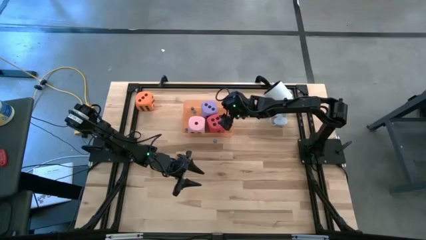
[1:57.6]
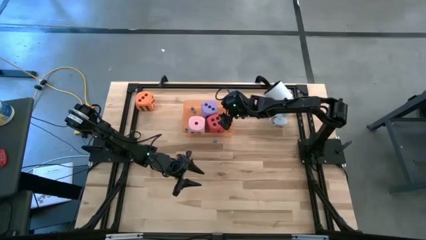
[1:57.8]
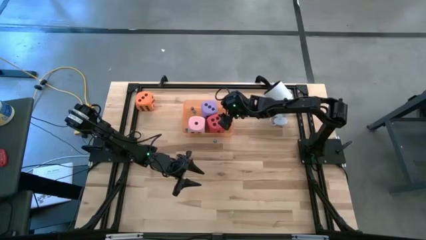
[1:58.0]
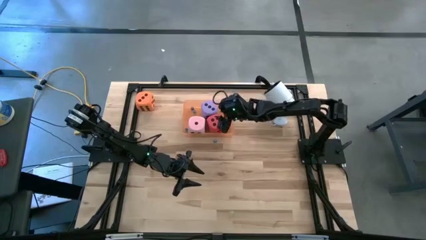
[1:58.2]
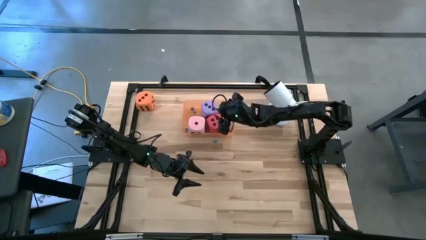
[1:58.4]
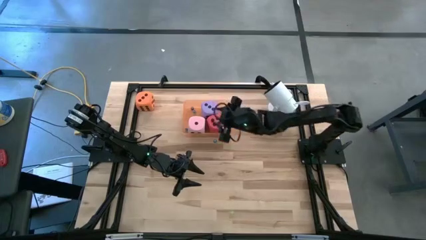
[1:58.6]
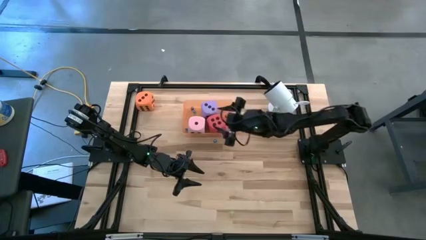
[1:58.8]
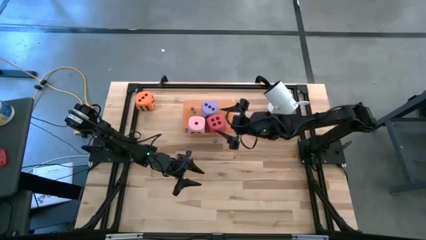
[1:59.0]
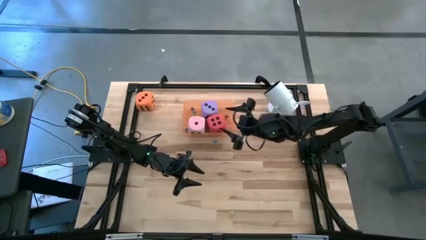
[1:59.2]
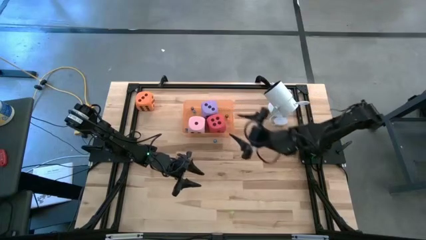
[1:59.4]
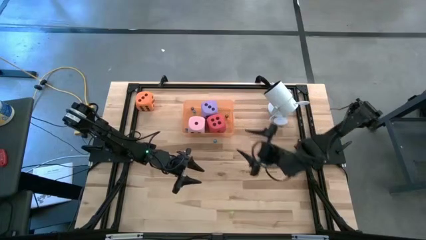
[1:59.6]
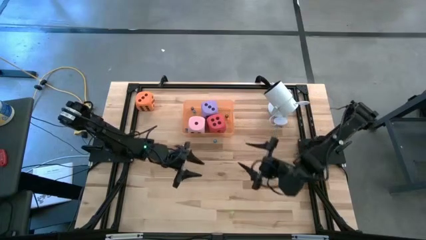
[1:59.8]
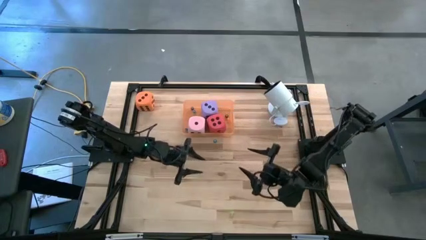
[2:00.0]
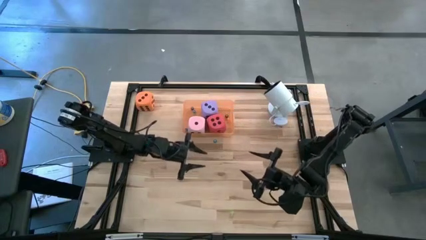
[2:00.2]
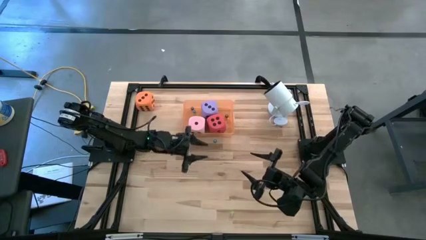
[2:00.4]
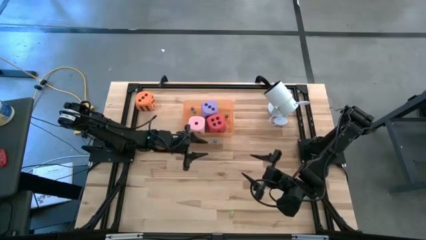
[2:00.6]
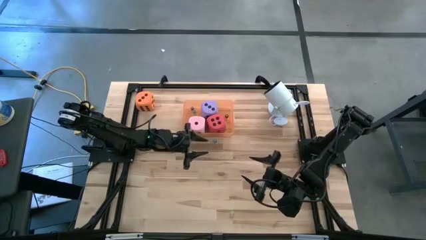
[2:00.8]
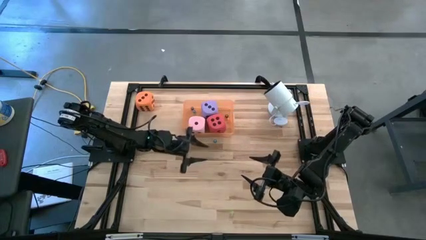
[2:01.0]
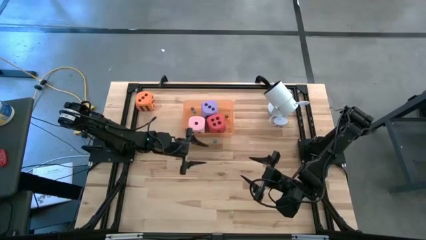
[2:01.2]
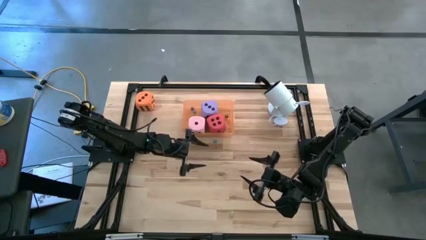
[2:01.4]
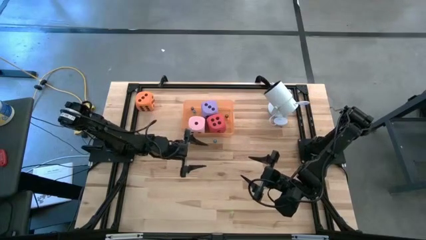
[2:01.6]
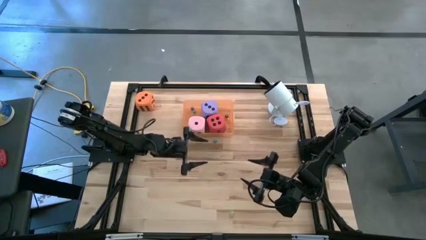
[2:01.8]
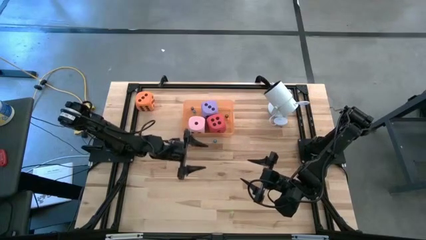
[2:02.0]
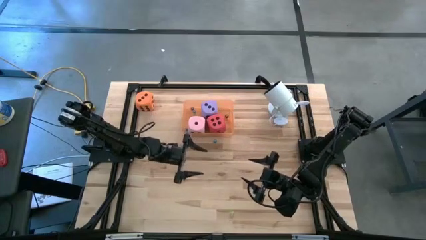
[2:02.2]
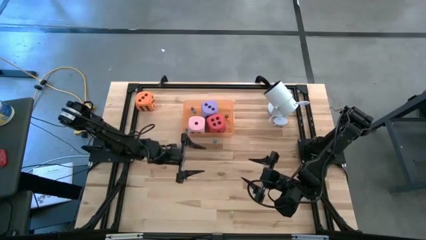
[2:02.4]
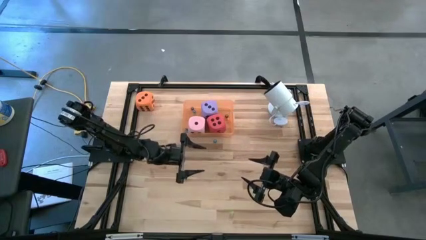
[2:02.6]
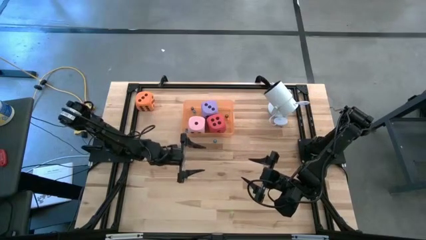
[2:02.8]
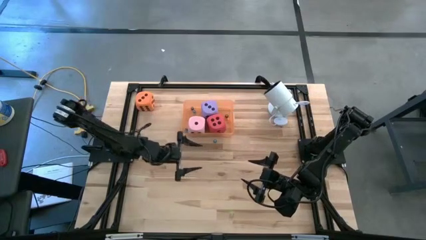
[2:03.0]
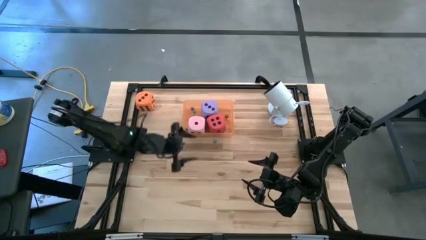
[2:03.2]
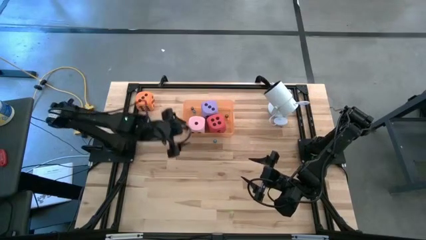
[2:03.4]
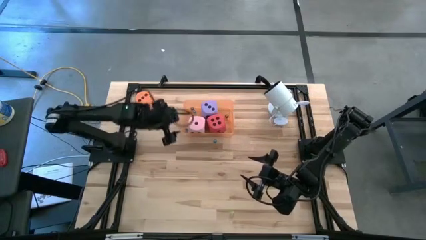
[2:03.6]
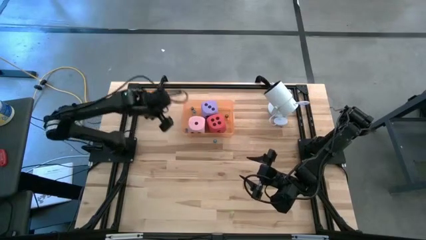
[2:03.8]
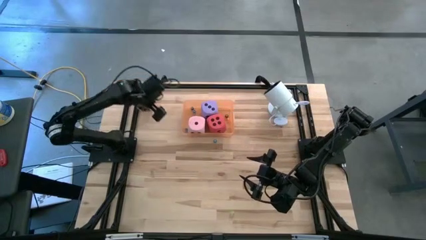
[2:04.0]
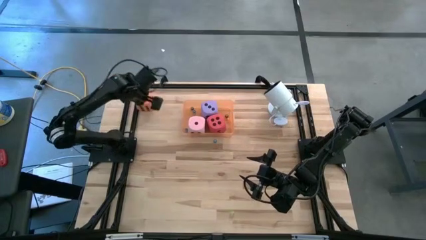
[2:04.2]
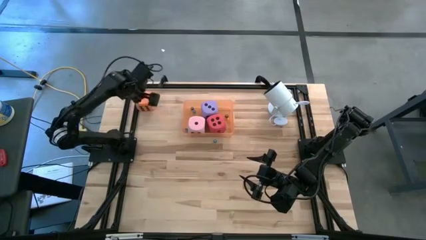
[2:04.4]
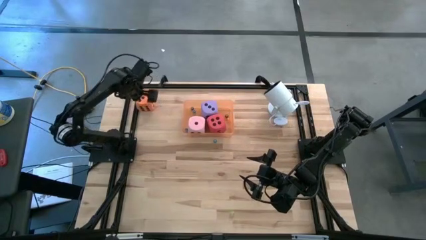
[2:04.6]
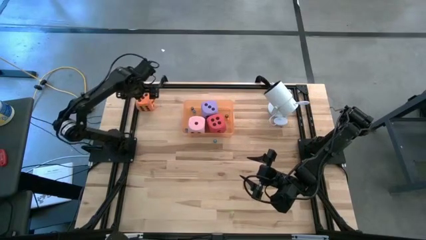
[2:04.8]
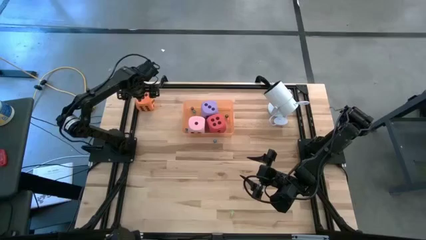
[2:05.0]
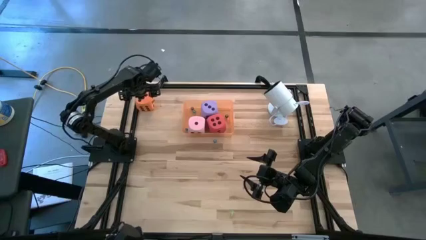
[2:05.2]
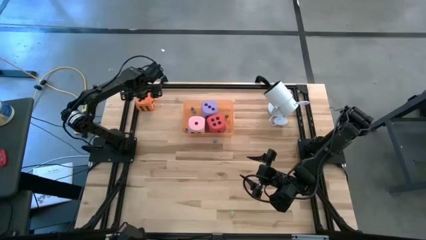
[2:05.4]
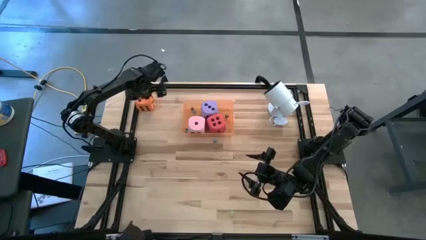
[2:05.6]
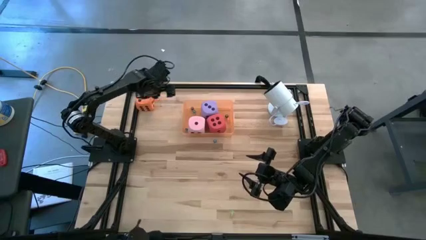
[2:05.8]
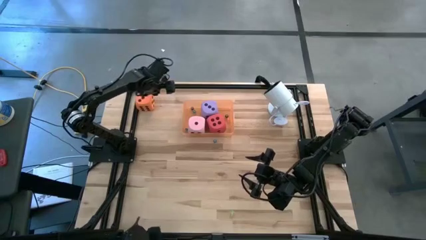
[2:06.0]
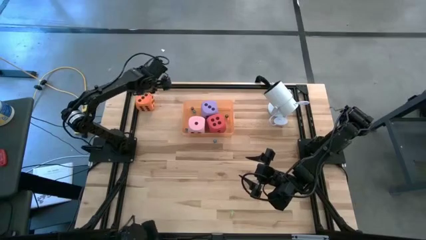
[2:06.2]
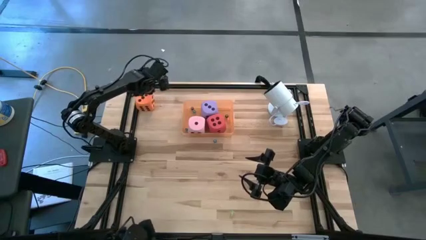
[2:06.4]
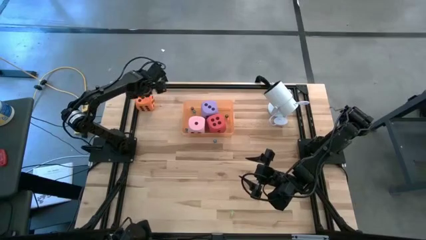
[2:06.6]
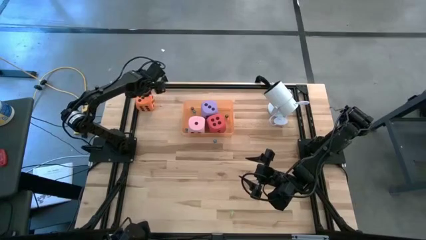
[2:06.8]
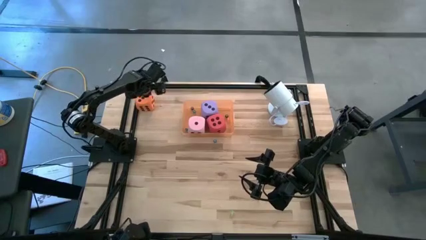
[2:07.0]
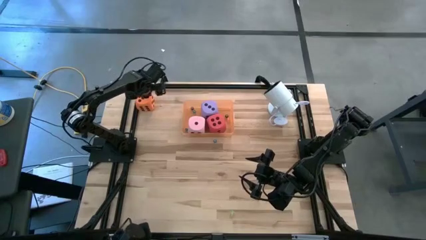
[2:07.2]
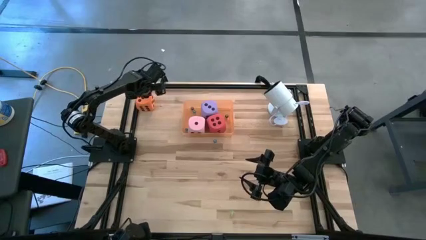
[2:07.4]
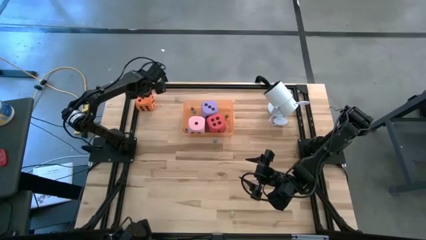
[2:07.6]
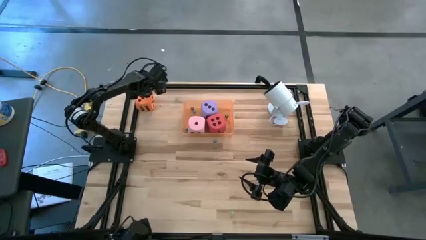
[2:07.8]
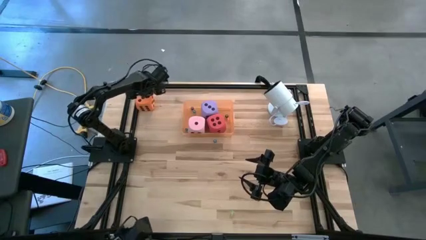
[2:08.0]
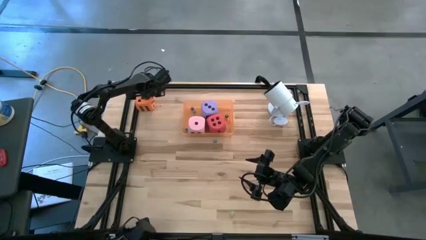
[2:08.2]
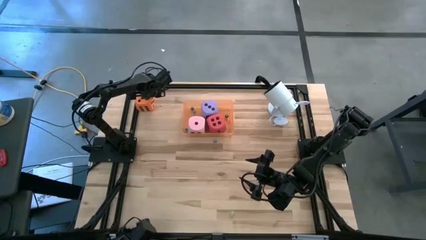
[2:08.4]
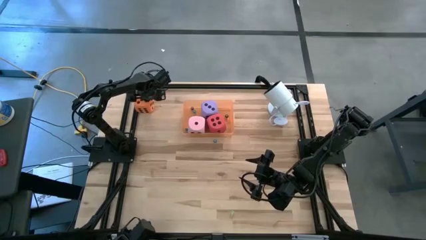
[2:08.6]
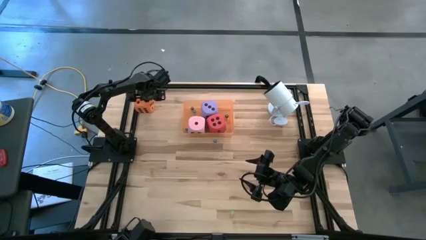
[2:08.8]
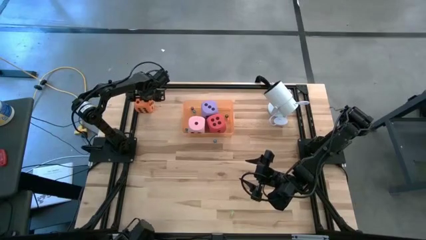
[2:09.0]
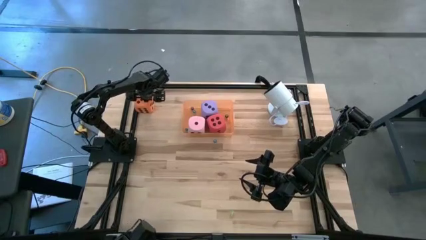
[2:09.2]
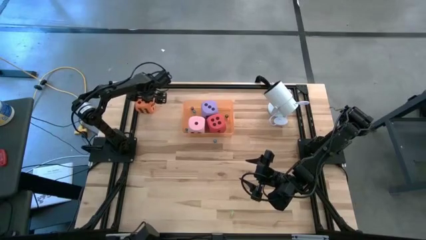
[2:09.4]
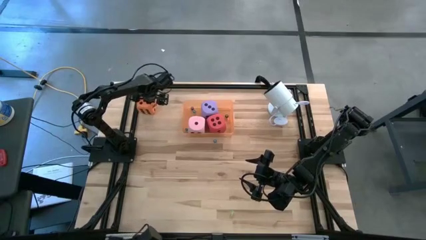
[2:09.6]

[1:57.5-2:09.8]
Task: Pick & Place Dice
Put the large orange dice in the orange bin

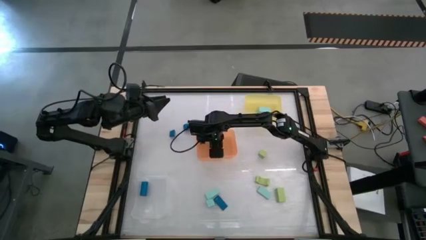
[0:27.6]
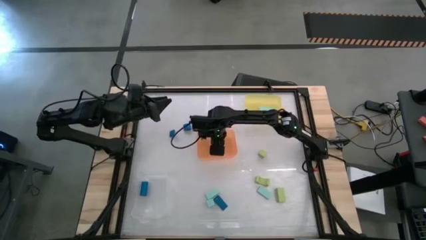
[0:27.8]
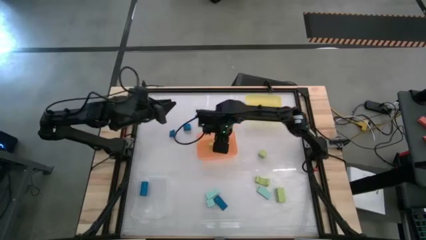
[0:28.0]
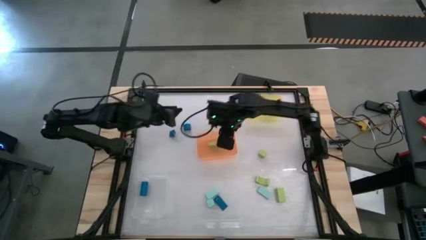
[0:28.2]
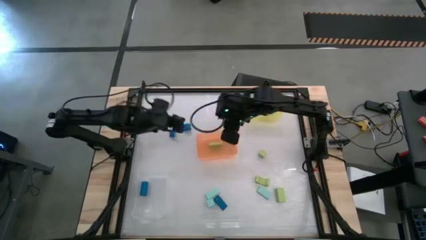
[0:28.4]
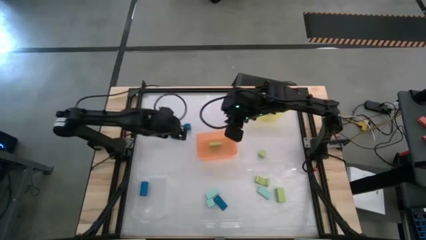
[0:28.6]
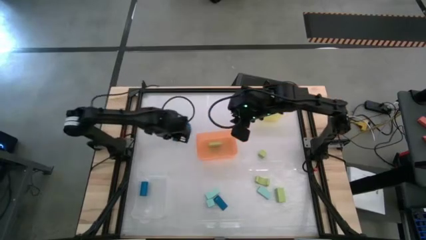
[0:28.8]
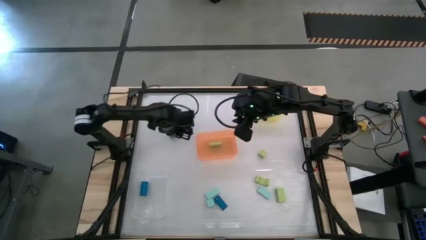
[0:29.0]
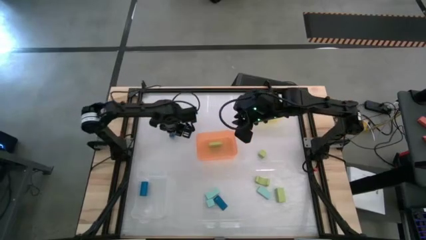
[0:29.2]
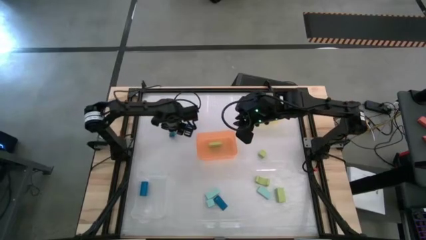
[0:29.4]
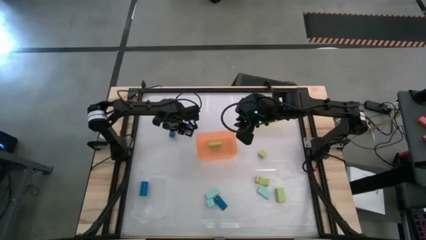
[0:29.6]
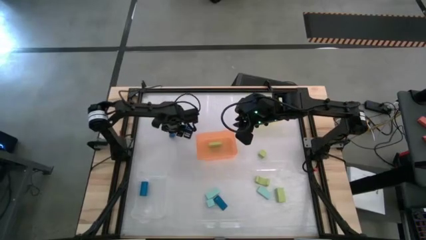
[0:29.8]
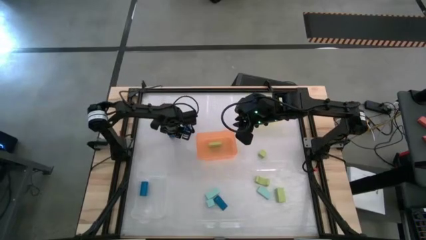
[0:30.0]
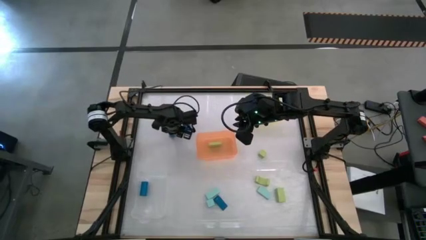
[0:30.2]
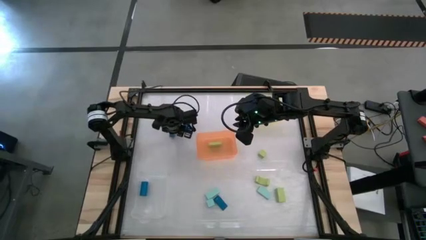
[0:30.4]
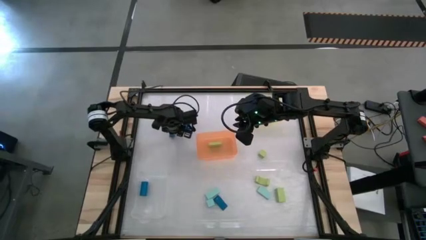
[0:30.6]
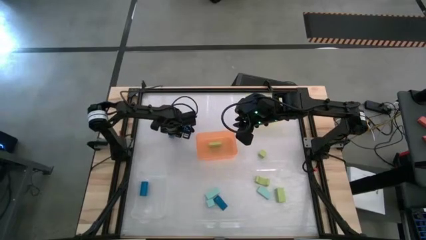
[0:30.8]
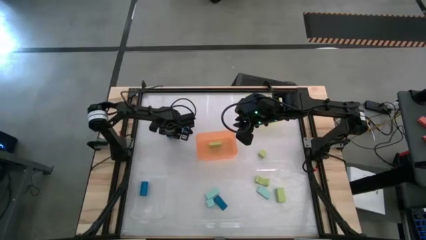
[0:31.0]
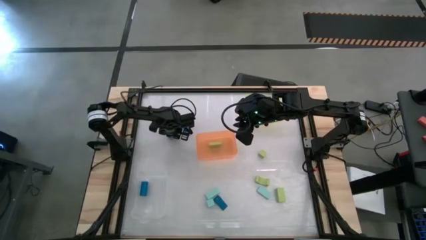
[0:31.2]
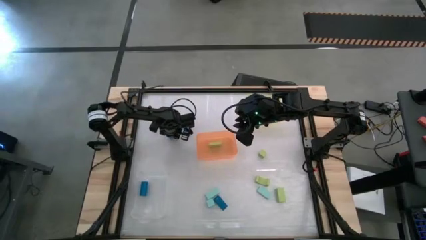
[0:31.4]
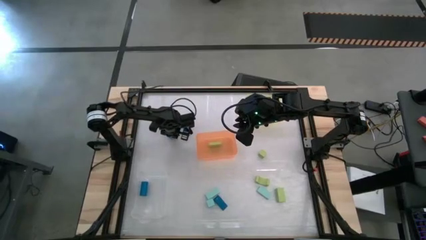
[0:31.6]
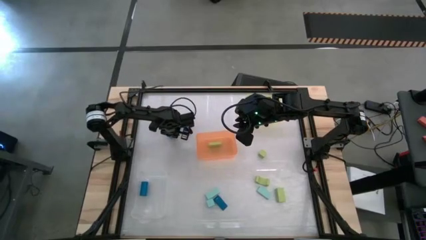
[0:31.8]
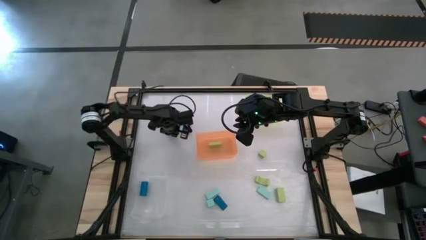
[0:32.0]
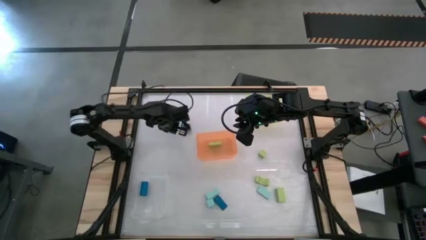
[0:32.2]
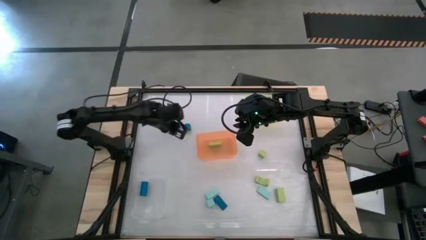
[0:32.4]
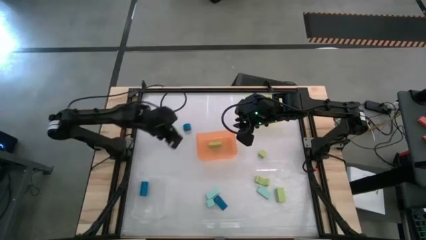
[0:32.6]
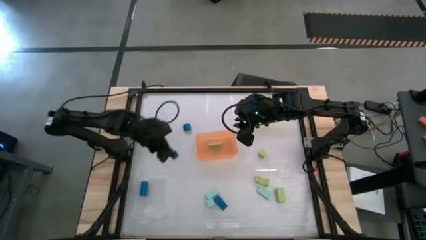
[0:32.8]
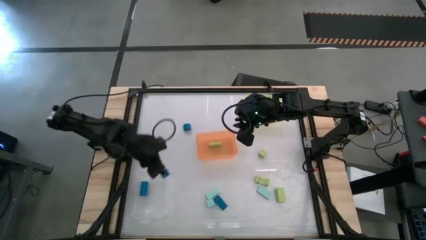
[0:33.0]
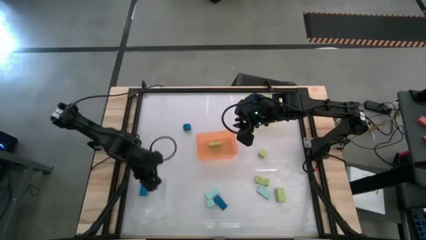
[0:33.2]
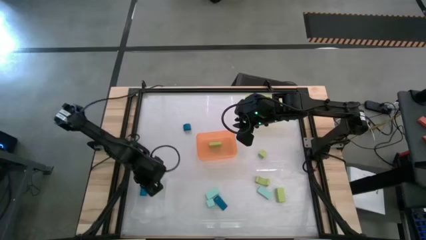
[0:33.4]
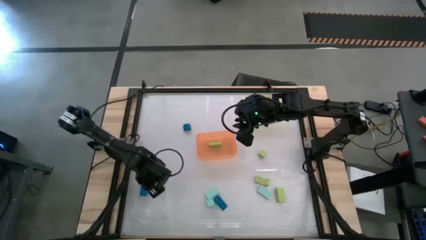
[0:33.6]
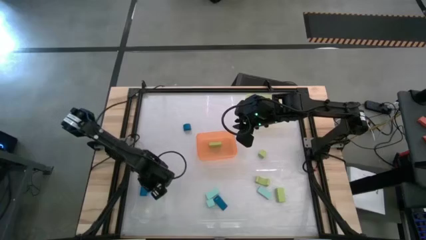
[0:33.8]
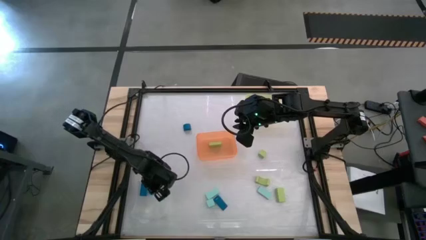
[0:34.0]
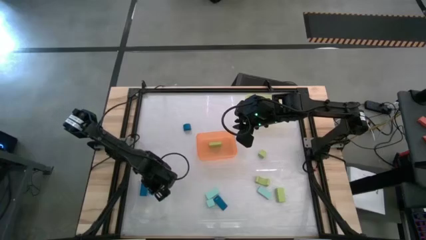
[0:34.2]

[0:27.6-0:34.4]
Task: Sort & place blocks by color
Put the blue block into the transparent bin
